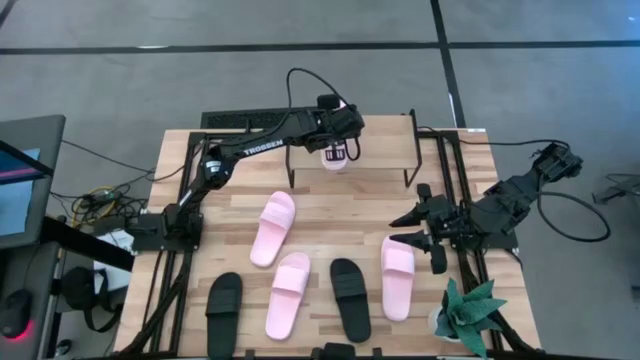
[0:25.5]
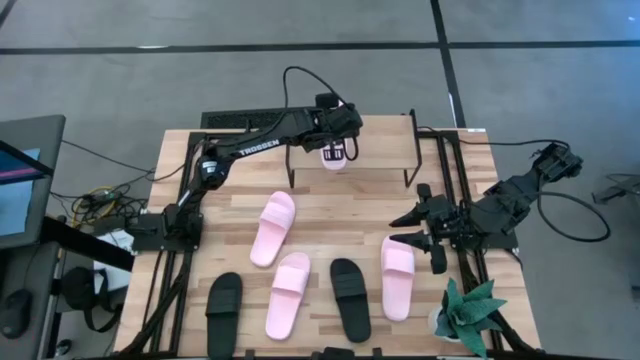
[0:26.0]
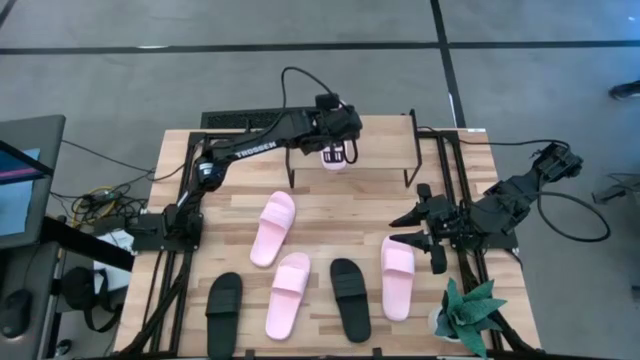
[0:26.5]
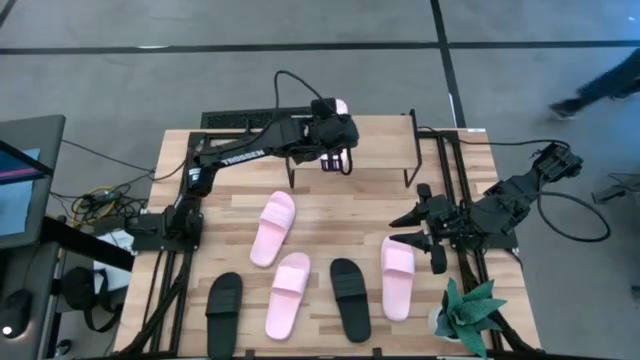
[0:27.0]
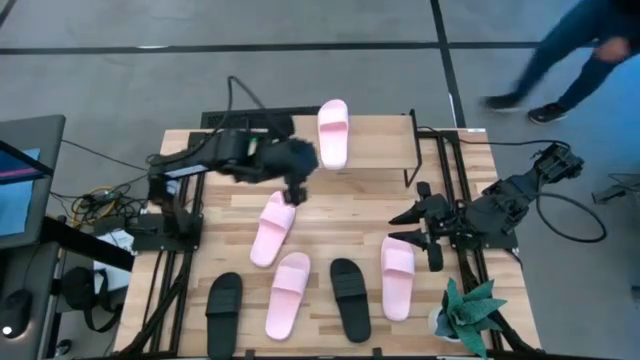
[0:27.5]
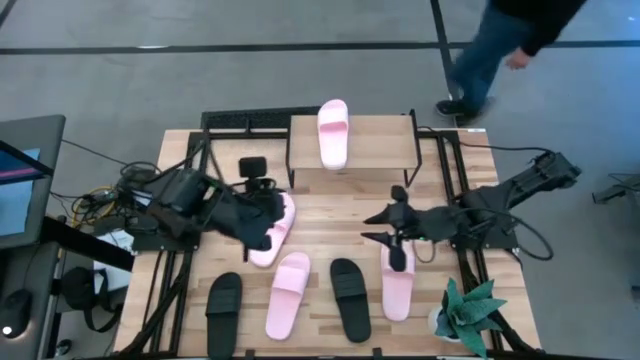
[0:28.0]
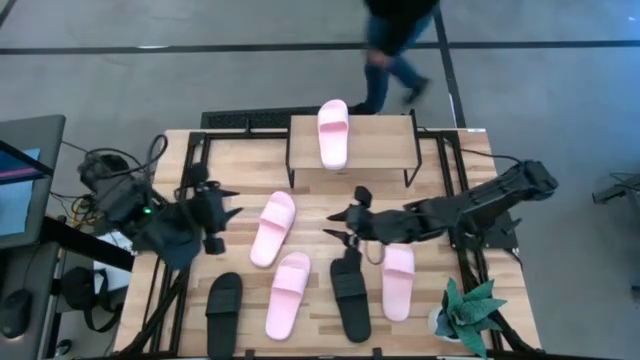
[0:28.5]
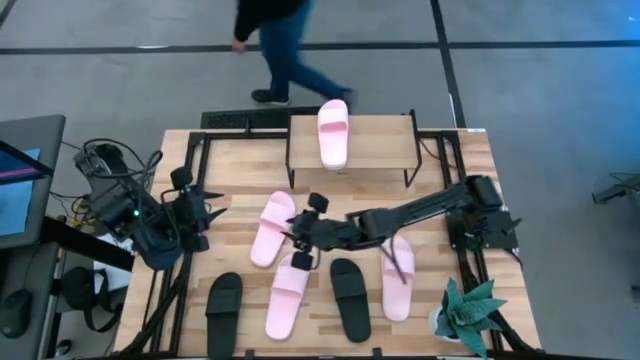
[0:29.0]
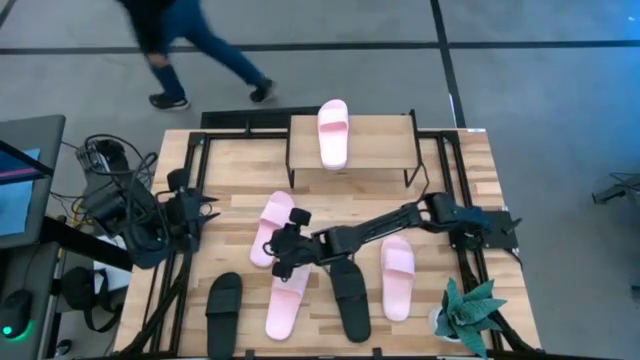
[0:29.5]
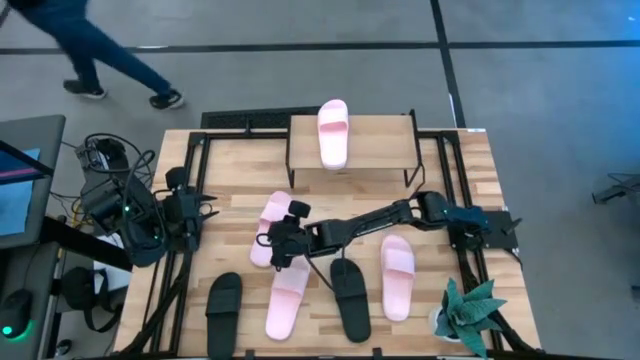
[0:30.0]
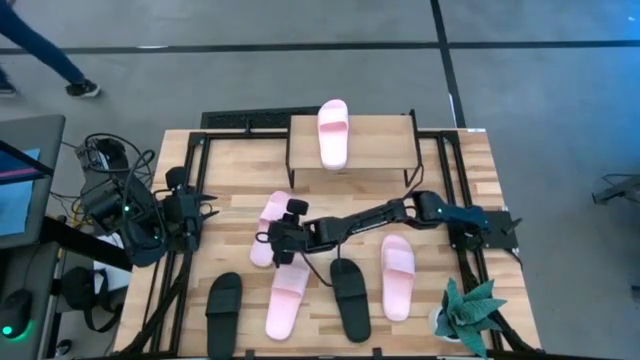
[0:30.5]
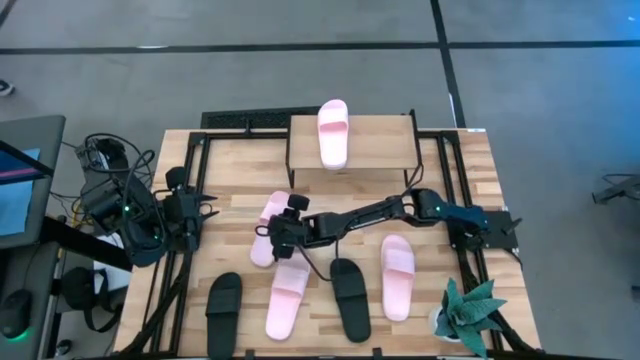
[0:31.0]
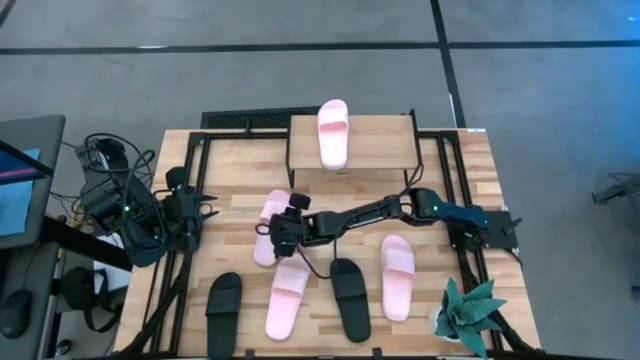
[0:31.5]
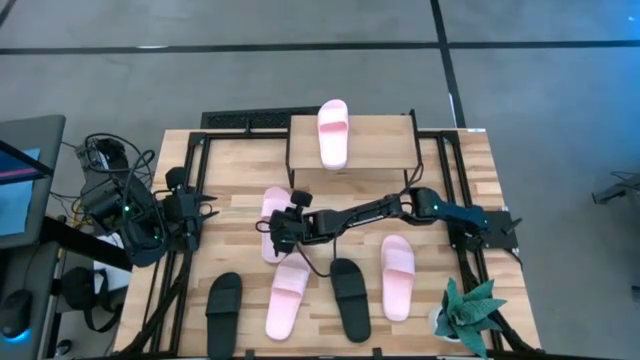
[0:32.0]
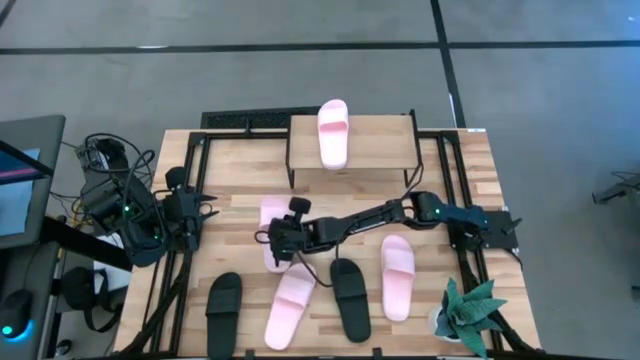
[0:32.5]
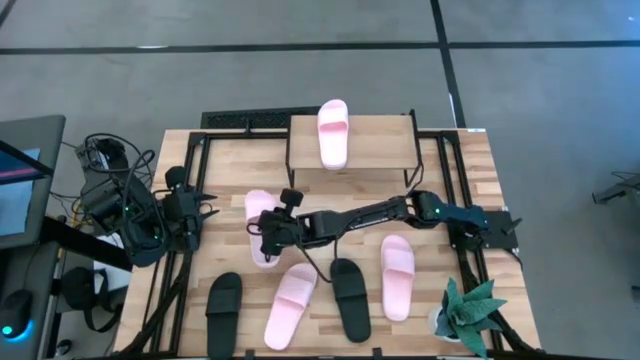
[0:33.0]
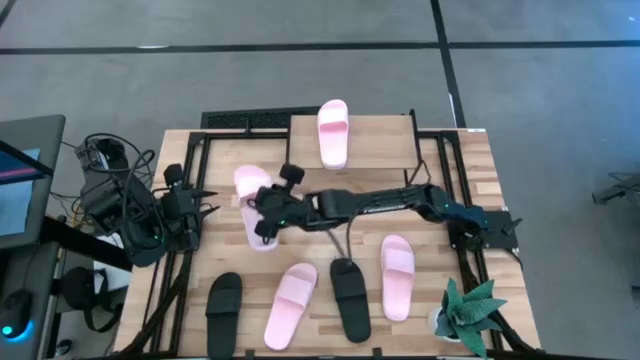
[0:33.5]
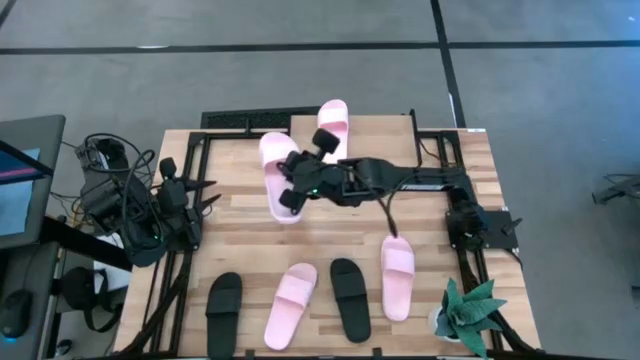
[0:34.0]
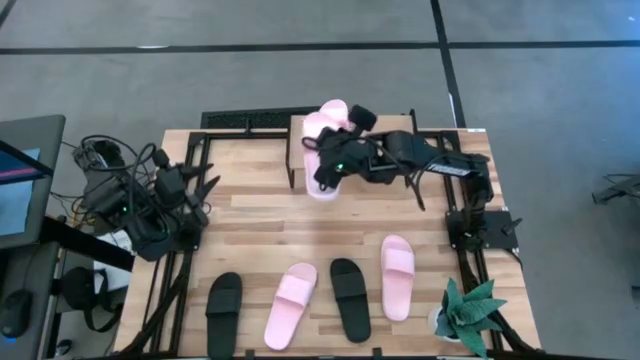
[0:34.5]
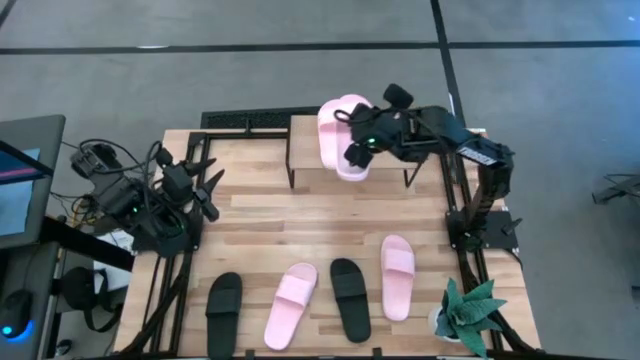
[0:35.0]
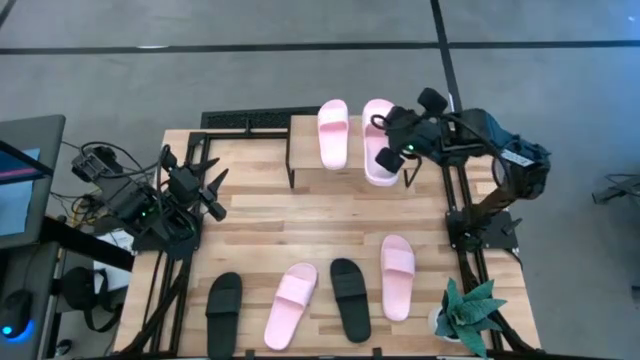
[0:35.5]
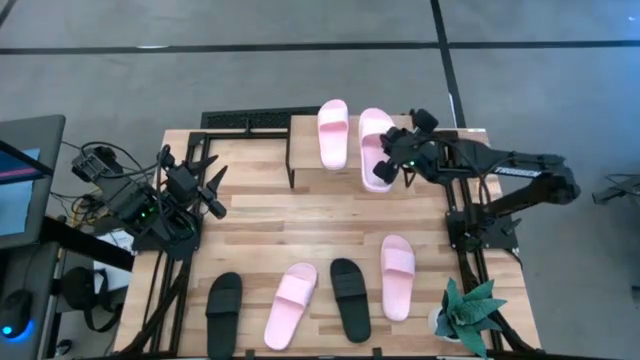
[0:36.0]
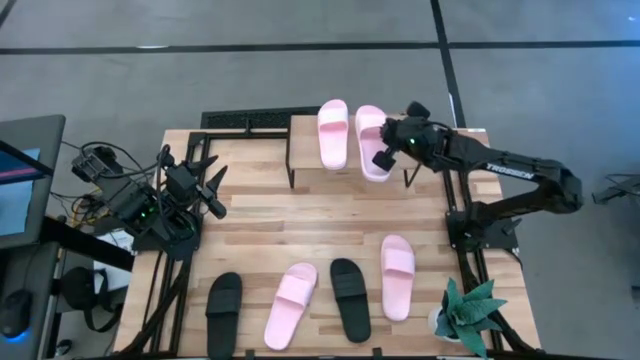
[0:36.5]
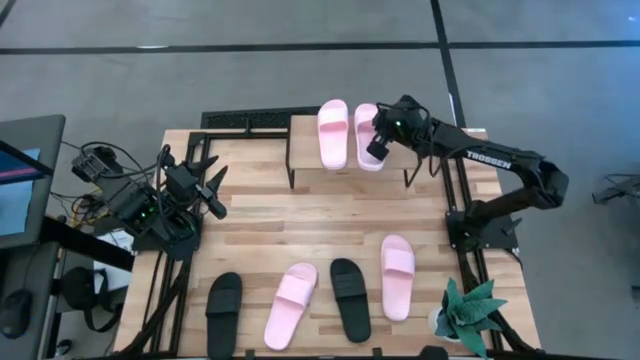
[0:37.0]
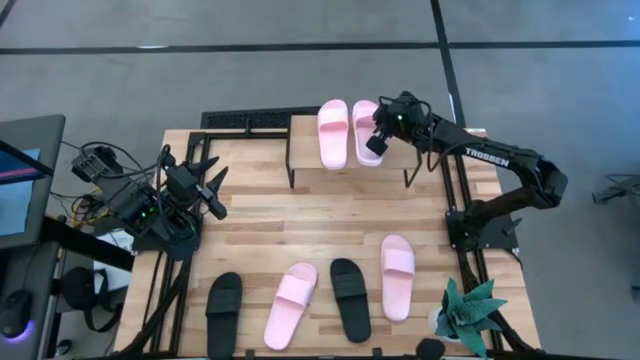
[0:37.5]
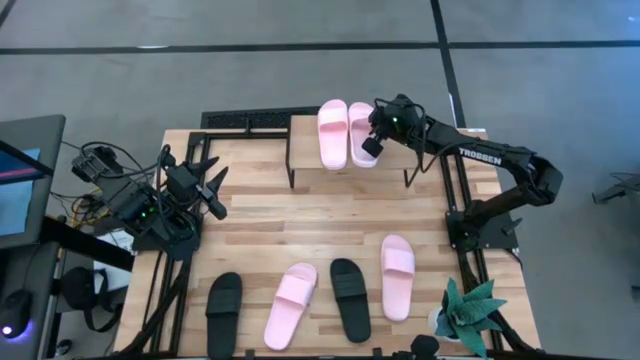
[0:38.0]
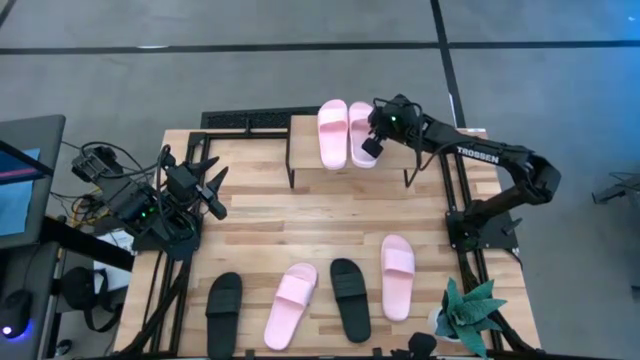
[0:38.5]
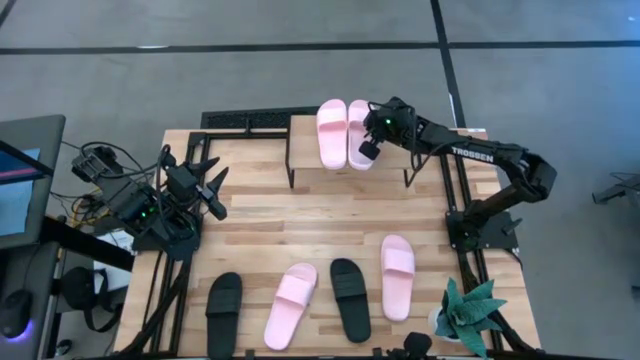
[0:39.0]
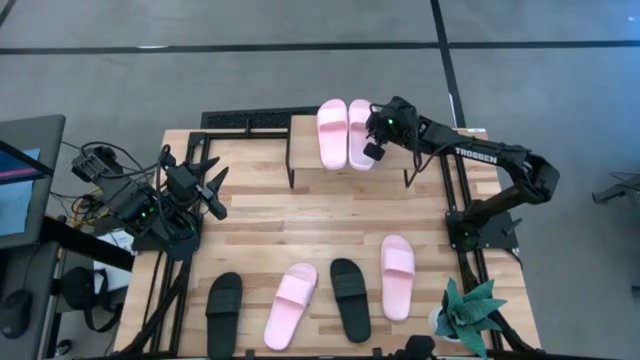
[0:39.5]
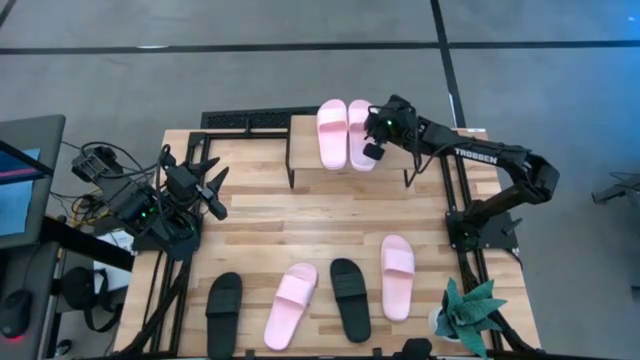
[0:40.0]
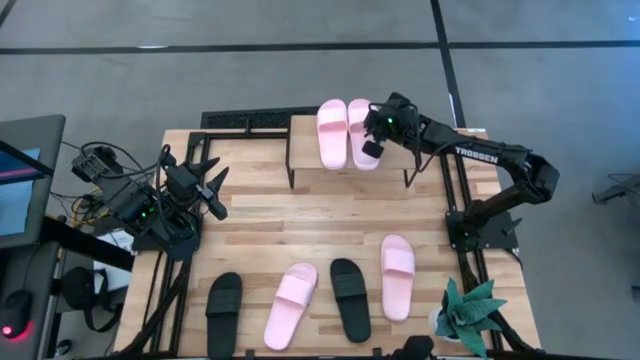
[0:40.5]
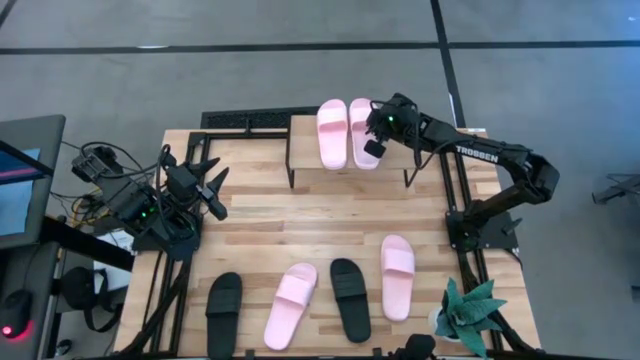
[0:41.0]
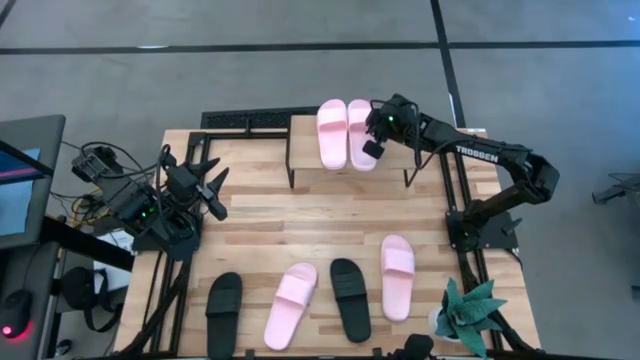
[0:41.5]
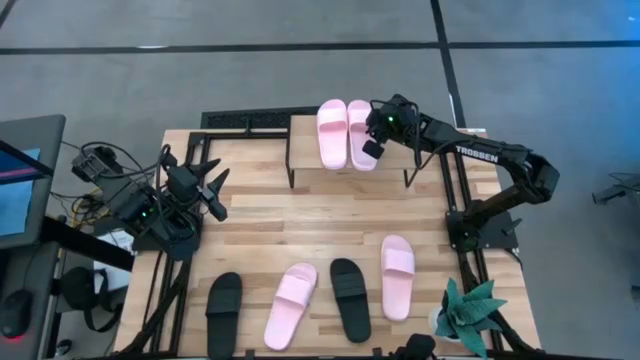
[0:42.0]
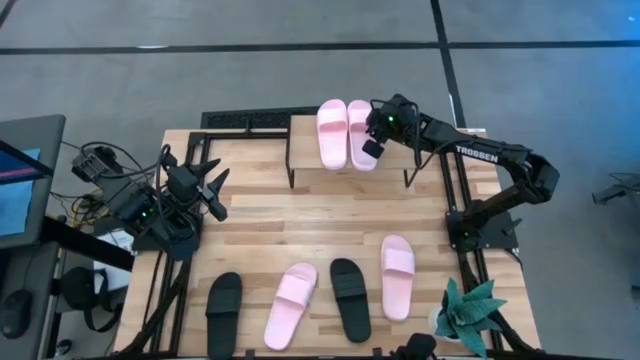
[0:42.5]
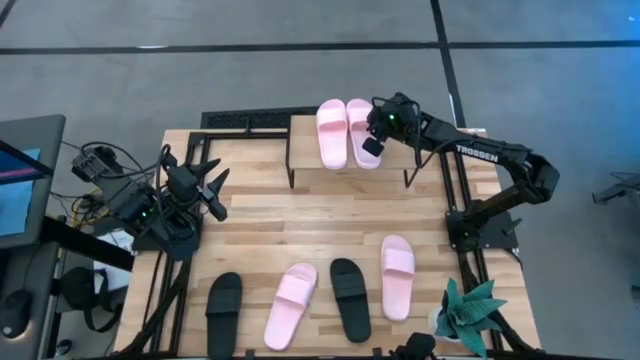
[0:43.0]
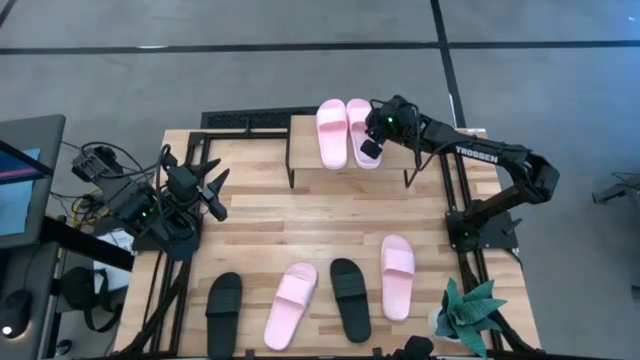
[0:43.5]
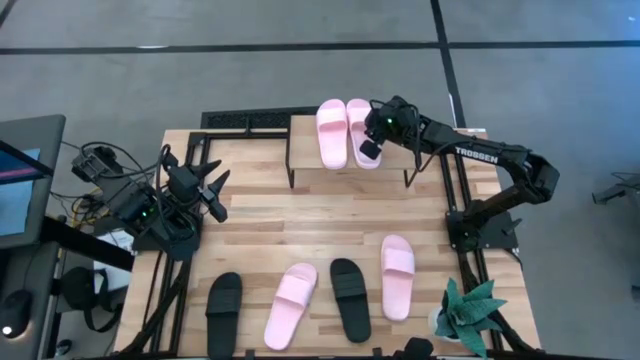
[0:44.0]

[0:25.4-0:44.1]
Task: Pick and place slides into the shelf
Put the top pink slide on the shelf

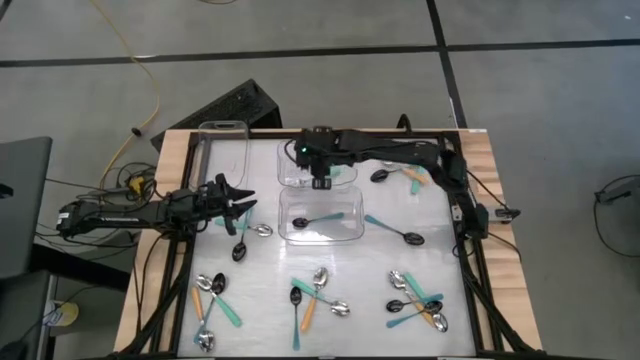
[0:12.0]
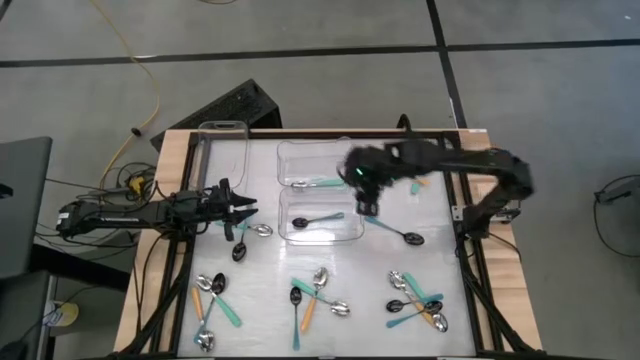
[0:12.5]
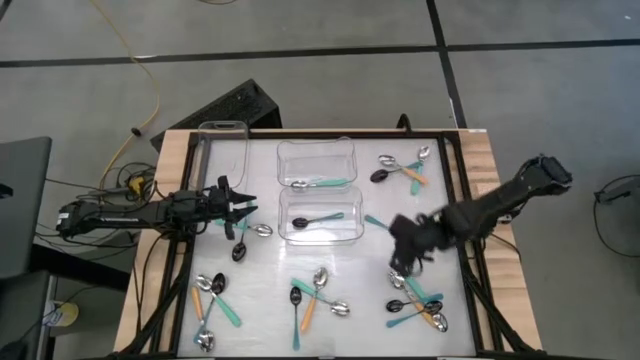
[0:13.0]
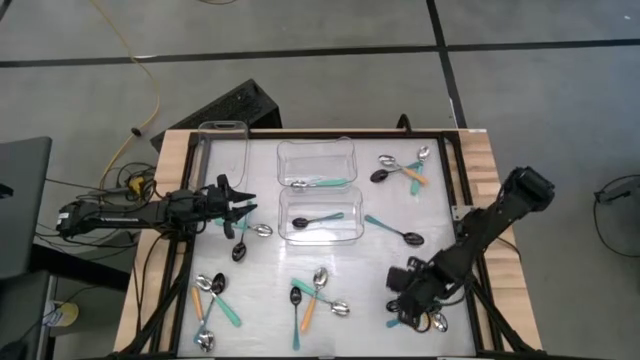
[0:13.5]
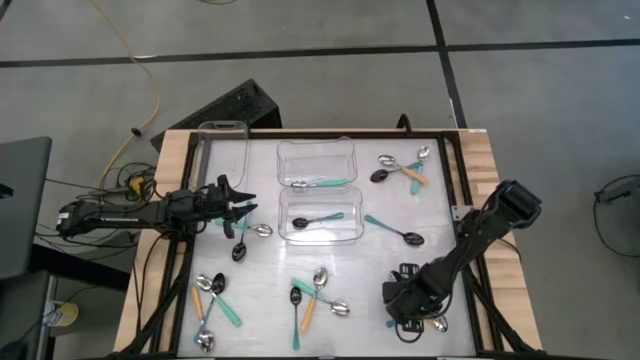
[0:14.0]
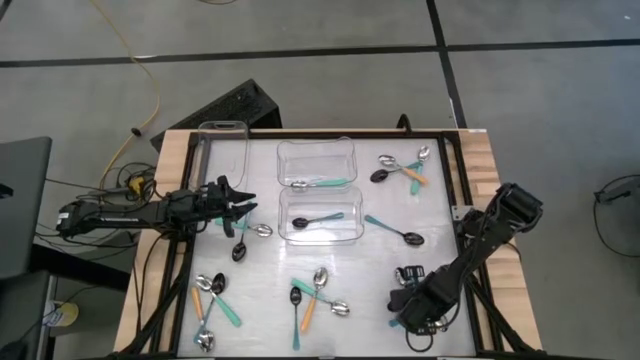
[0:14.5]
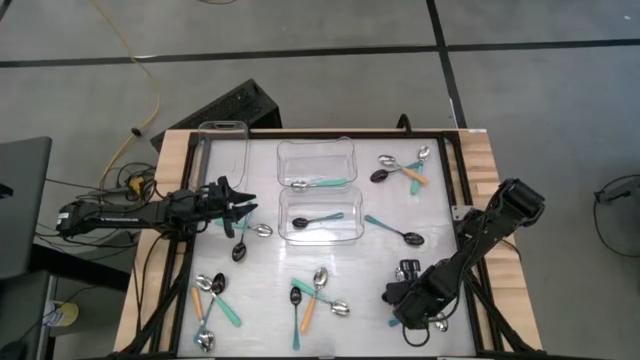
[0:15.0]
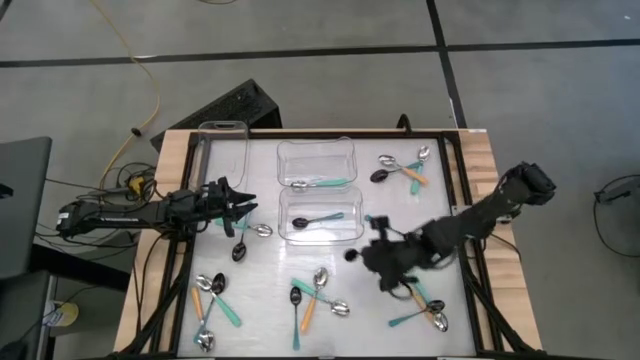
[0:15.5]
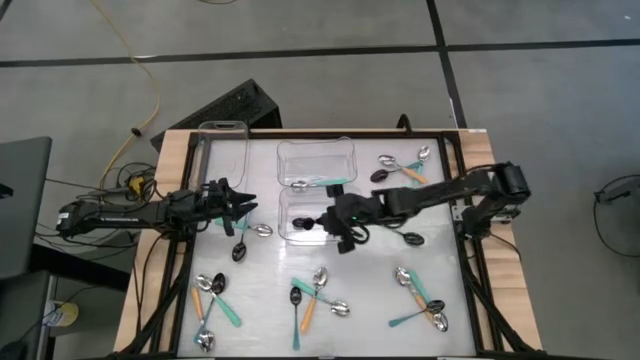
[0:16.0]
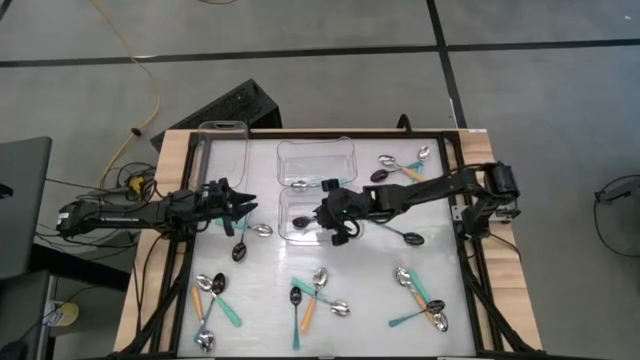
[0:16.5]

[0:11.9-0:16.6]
Task: Sort silverware by color (type)
Put the blue spoon into the bottom transparent bin
